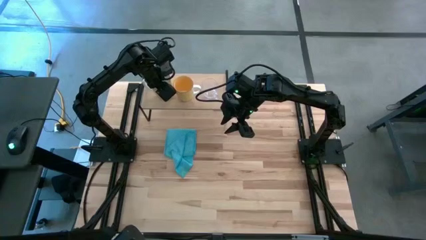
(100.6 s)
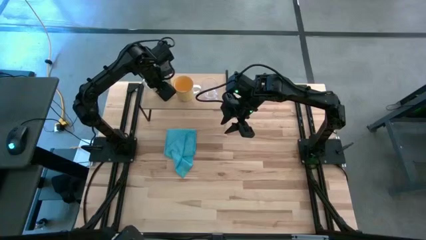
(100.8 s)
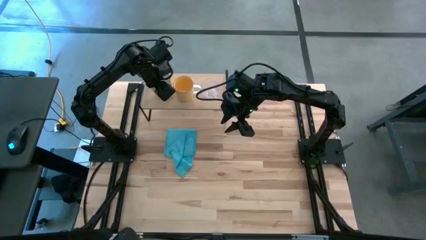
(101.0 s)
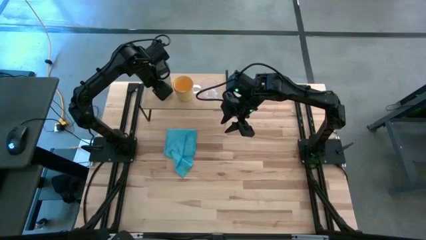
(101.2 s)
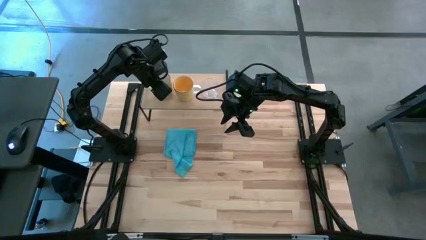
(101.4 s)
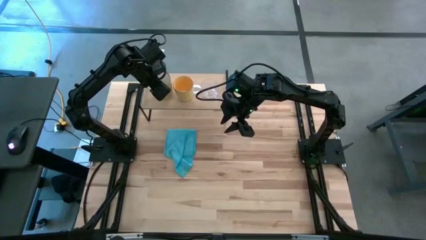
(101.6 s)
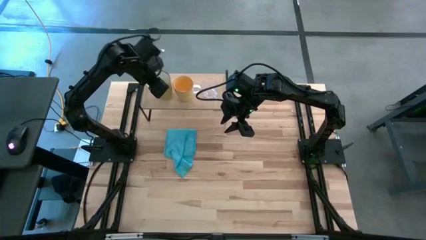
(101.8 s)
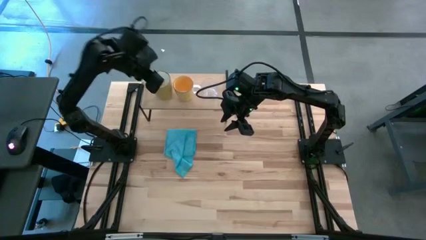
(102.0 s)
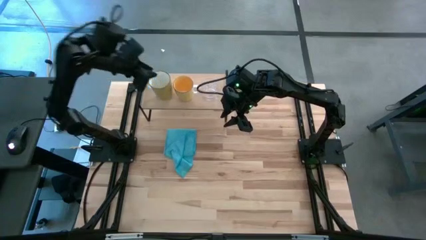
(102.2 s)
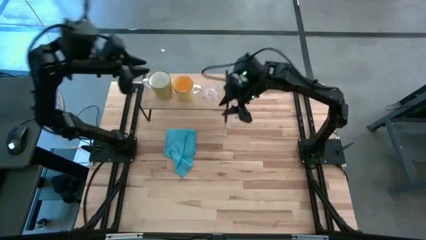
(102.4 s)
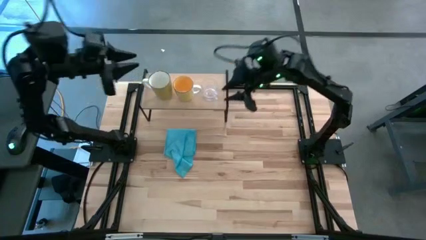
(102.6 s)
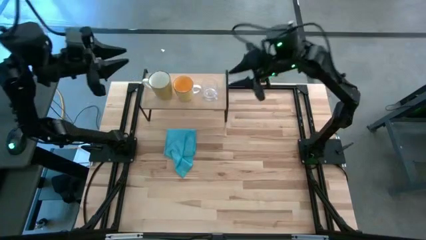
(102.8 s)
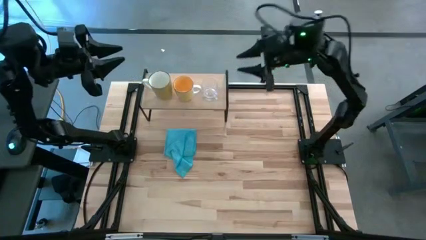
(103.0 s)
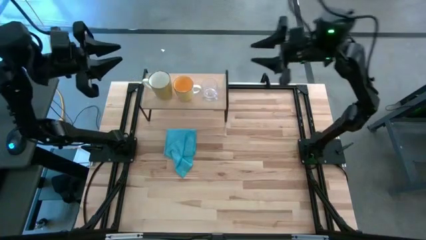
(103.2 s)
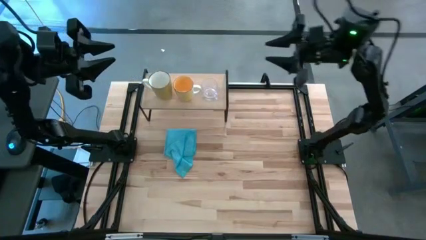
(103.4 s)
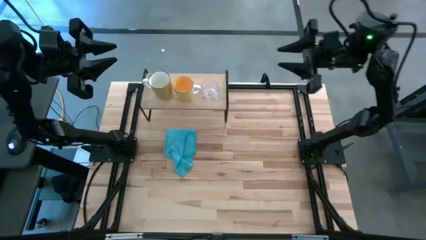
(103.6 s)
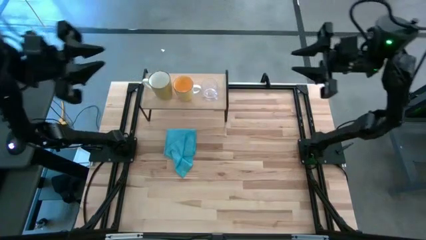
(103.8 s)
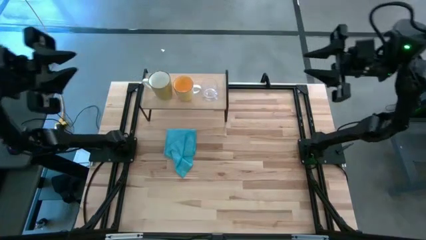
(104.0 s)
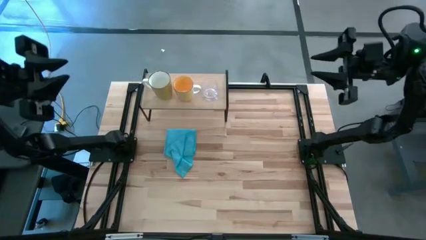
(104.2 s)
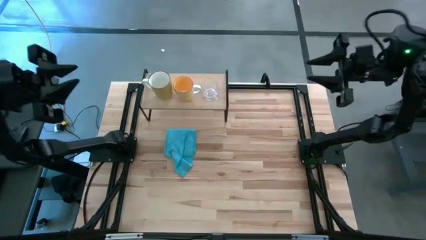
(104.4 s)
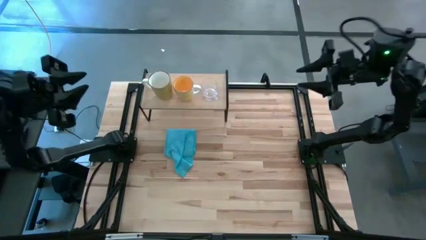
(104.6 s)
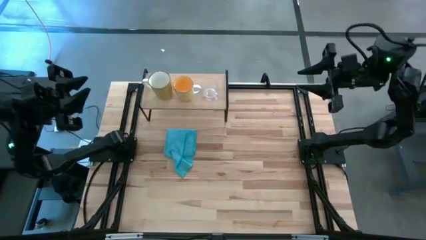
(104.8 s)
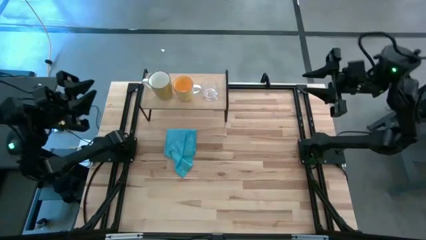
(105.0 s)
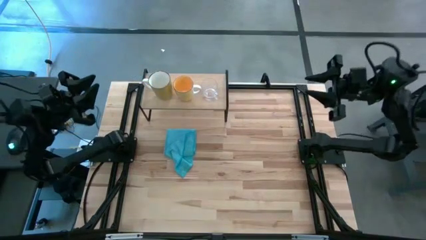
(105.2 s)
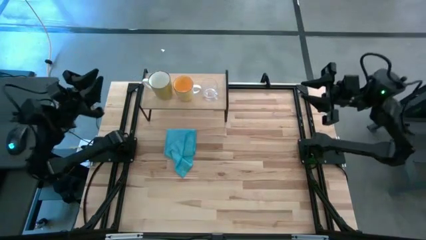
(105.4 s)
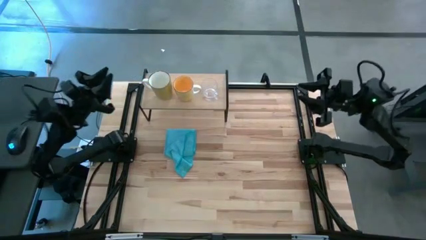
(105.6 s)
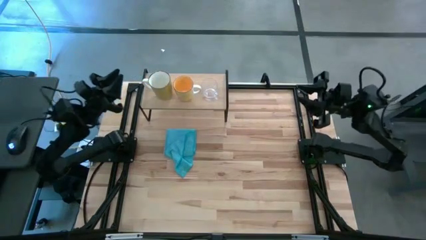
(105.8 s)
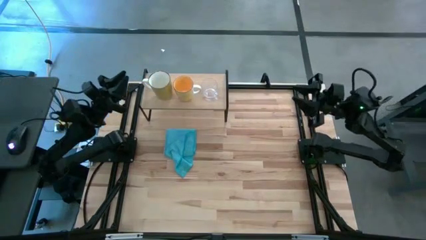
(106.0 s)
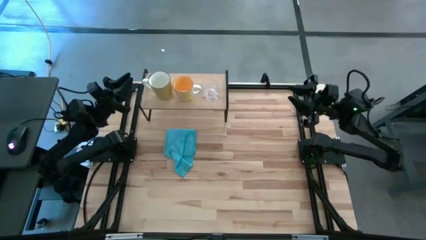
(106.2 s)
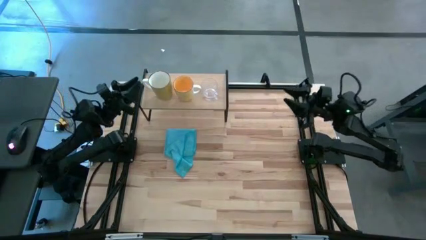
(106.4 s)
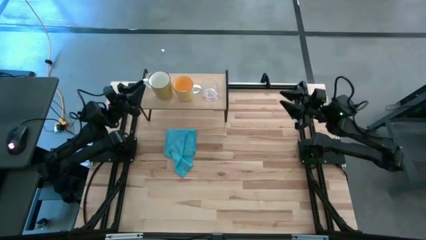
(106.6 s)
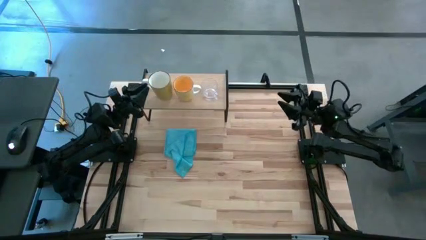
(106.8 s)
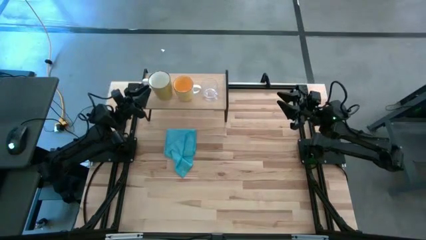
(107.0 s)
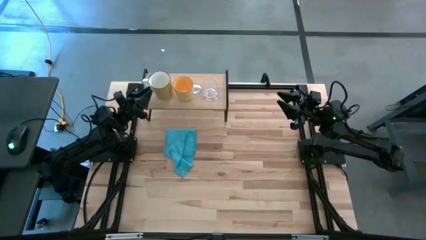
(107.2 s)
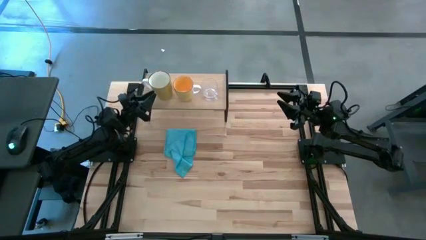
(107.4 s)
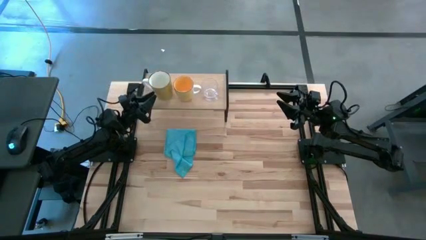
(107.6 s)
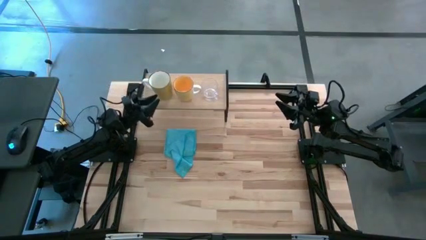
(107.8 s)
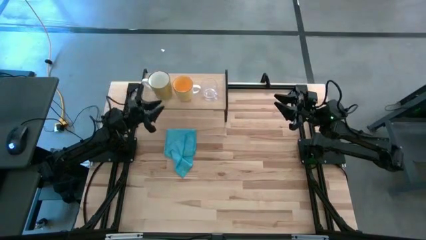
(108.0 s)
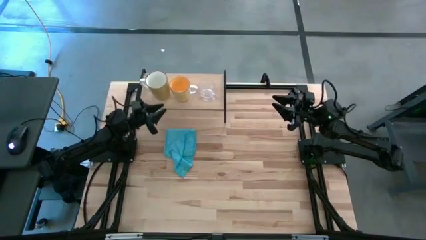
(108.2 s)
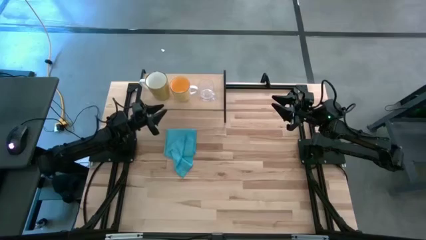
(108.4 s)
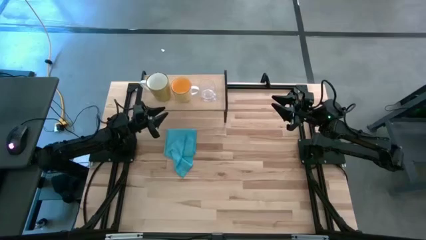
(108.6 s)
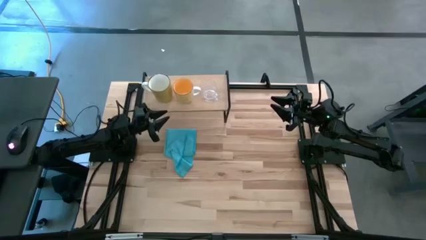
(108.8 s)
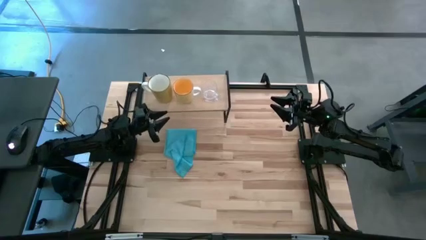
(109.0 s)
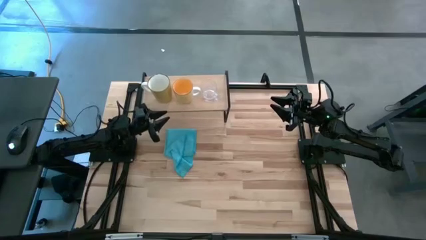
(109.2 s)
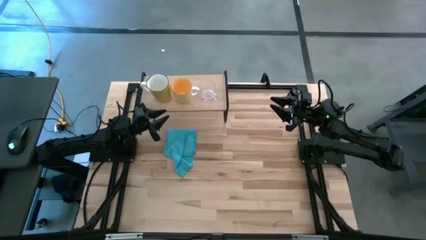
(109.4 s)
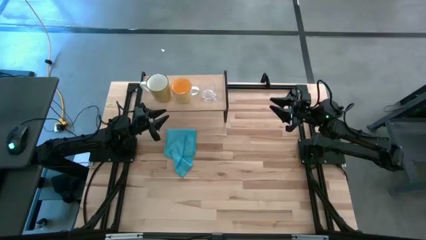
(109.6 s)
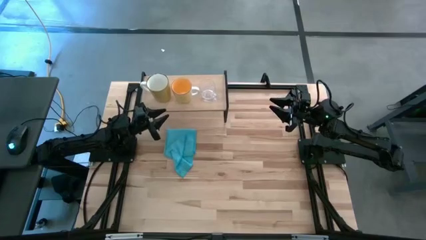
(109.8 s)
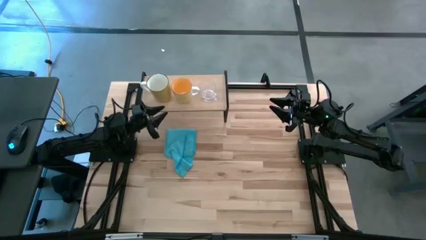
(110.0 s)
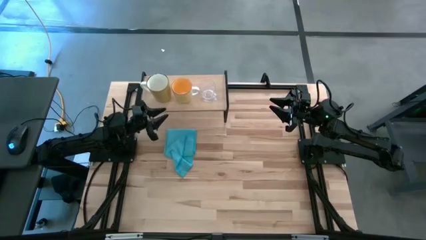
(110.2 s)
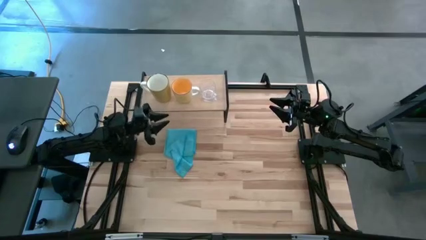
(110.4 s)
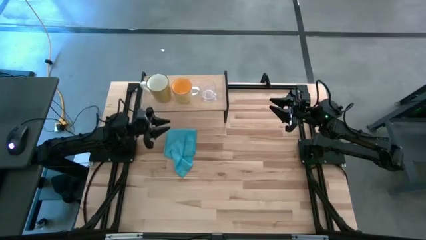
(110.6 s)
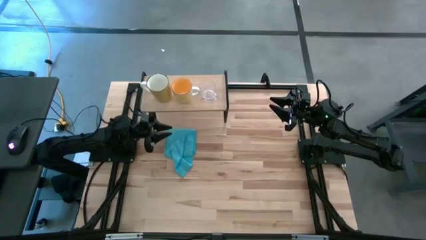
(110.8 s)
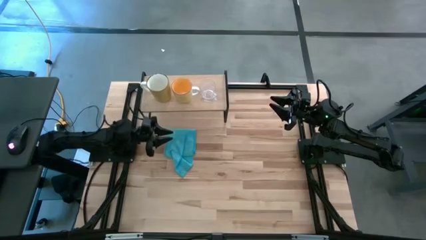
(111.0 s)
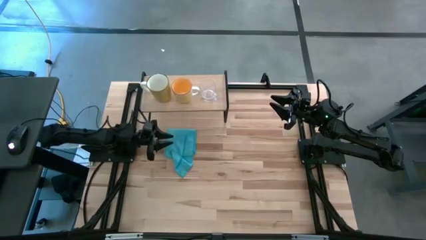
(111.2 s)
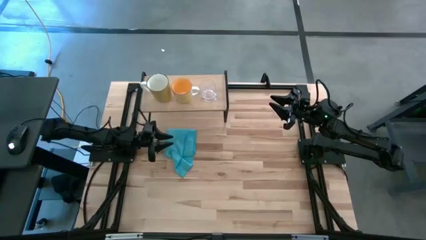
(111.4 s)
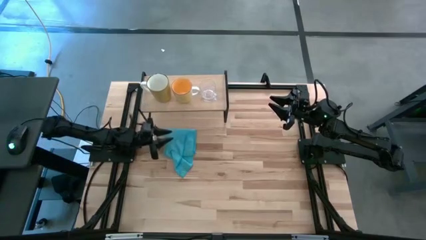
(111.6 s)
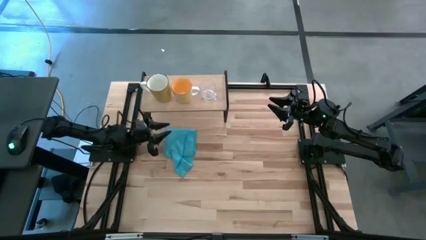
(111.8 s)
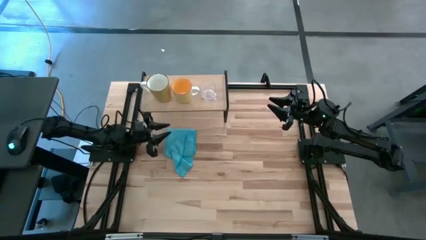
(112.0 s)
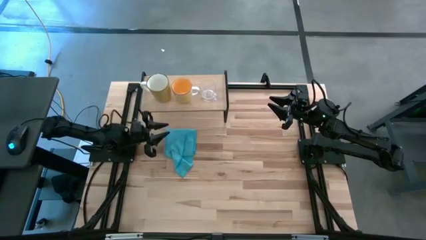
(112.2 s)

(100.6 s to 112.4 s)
Task: Stack small to large cups/mugs on shelf
Return to Home Position

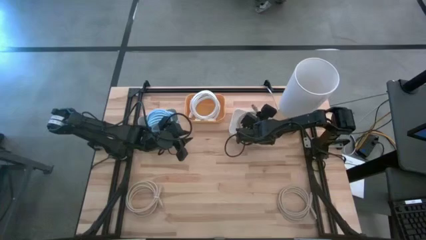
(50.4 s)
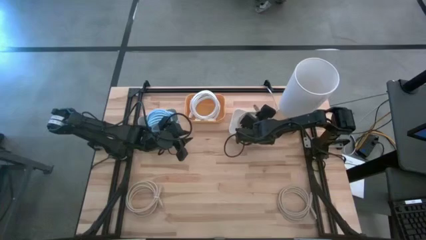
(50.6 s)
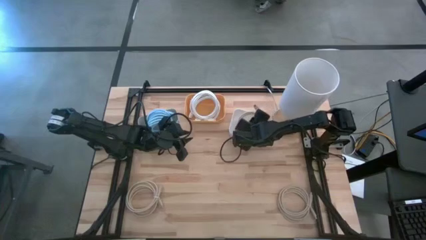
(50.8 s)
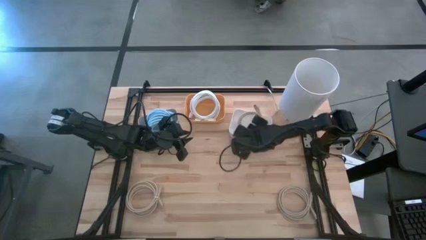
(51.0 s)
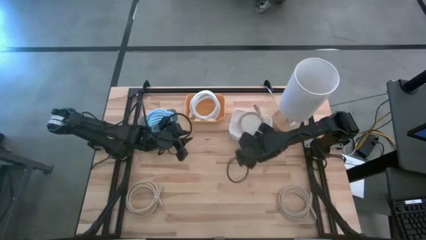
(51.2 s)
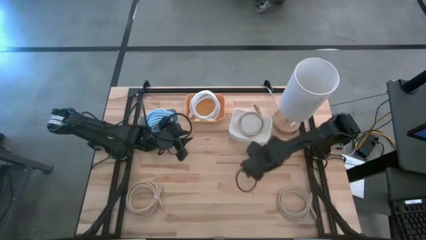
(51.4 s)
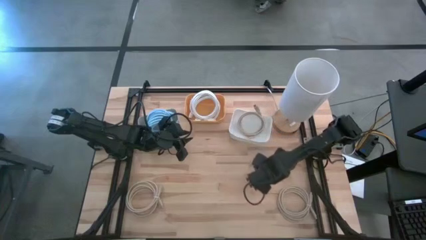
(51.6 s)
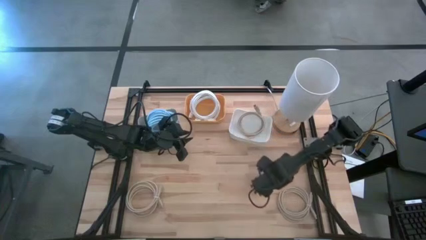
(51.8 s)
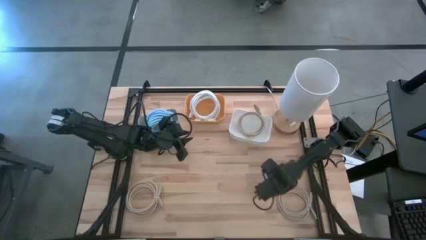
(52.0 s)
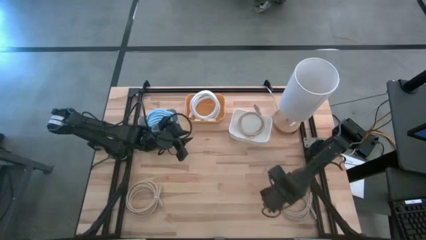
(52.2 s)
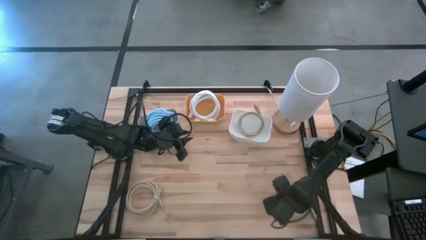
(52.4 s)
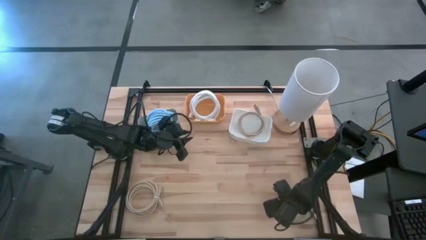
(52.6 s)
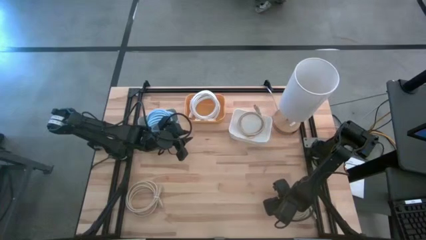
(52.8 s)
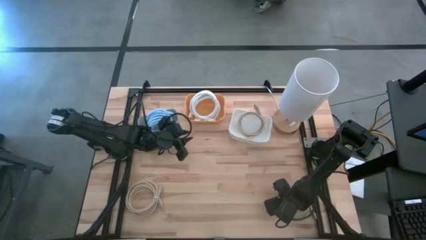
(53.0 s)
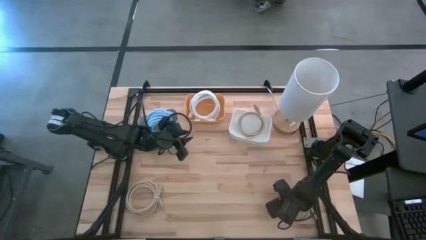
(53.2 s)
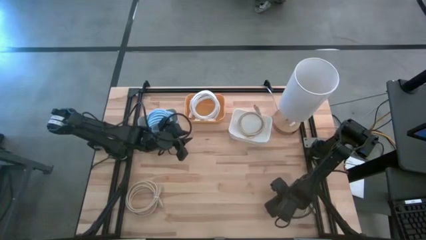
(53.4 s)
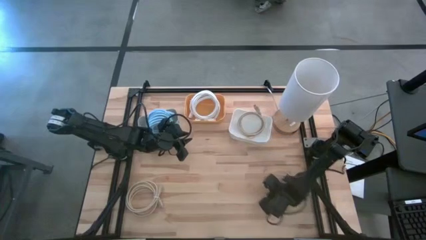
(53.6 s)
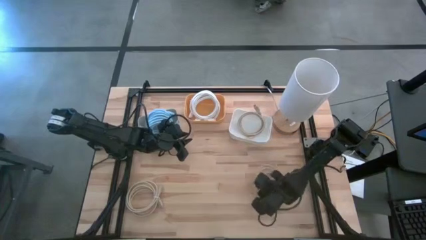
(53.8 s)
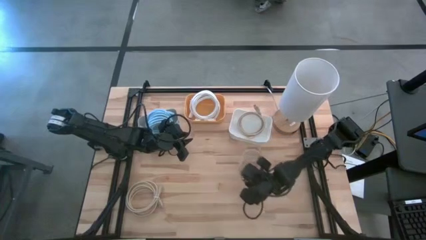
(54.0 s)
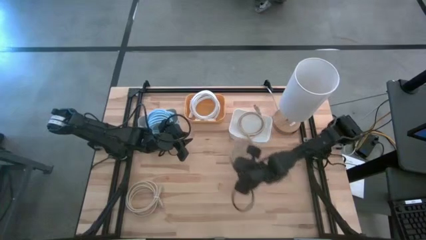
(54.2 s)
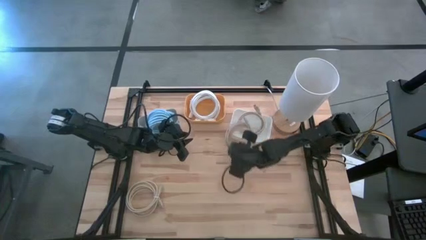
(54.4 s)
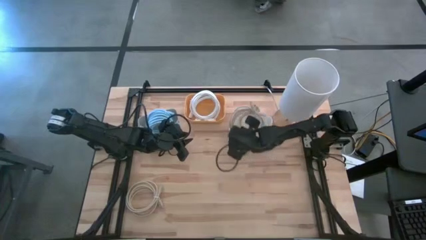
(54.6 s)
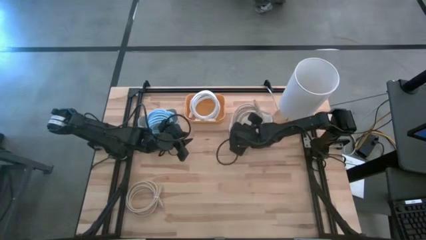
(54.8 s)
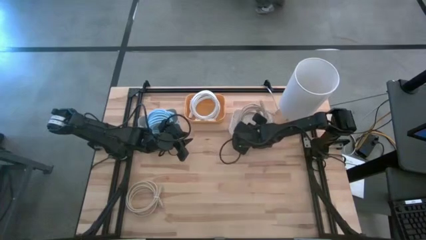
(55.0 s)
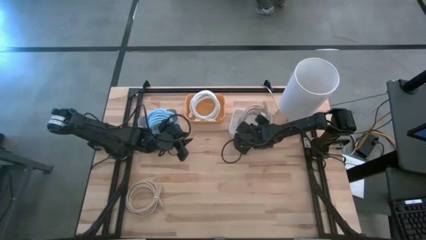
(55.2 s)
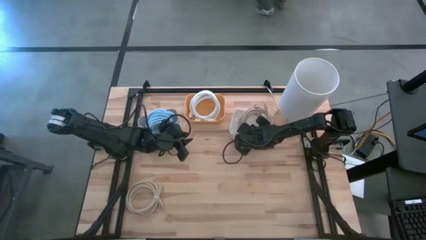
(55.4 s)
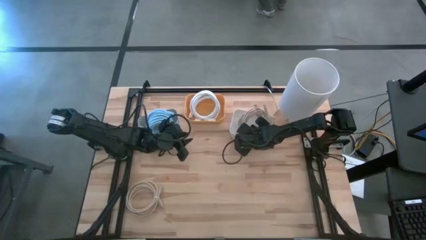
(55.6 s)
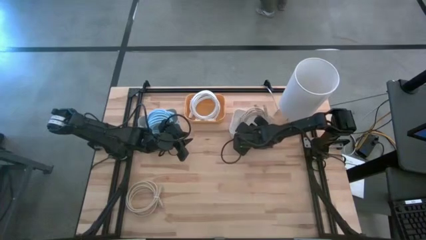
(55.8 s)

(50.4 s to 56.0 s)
Task: Sort HDMI cables
Put the right brown hdmi cable into the white bin
